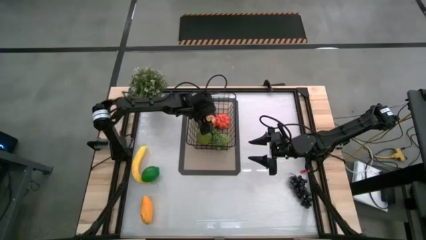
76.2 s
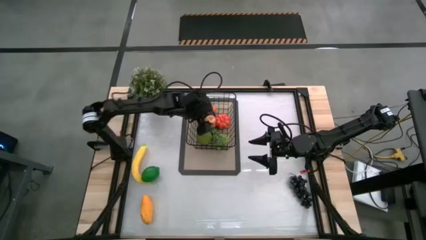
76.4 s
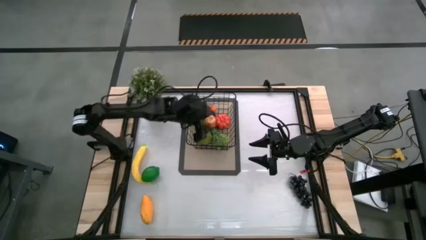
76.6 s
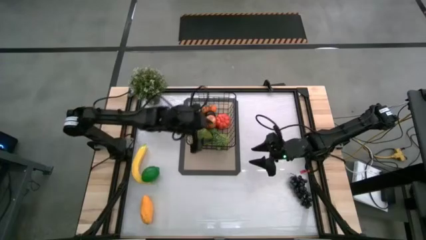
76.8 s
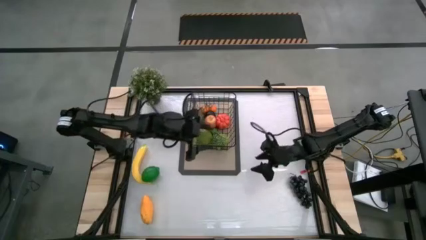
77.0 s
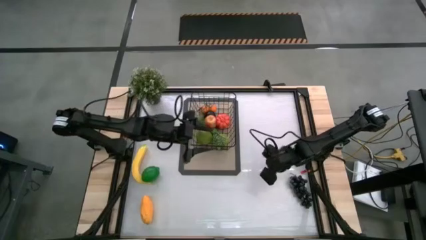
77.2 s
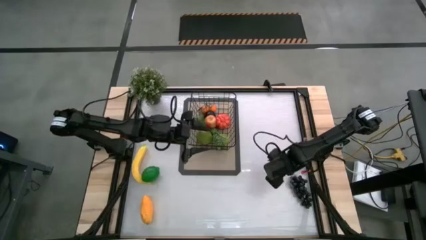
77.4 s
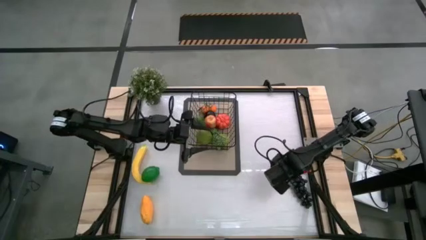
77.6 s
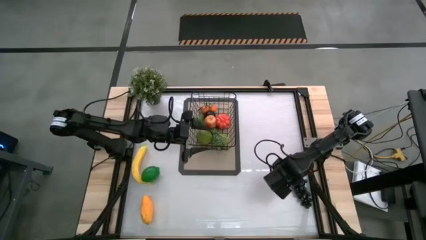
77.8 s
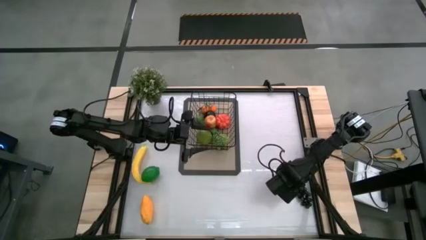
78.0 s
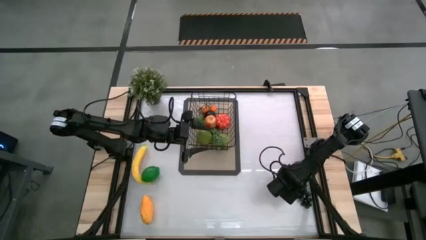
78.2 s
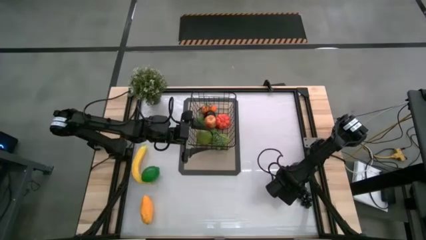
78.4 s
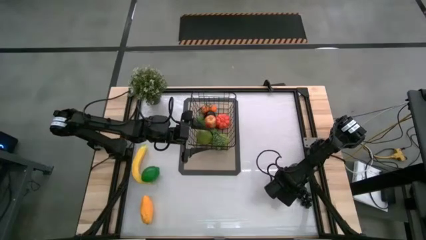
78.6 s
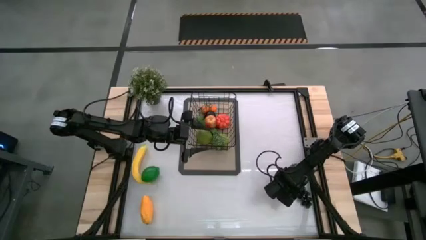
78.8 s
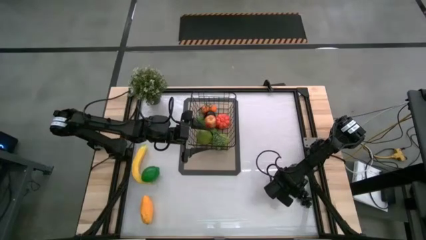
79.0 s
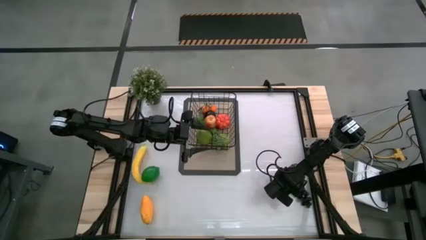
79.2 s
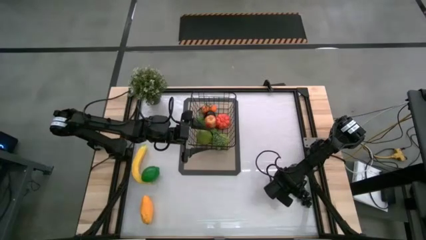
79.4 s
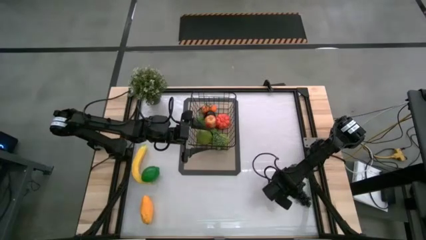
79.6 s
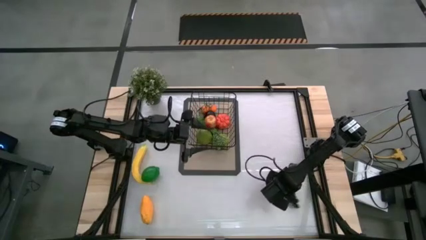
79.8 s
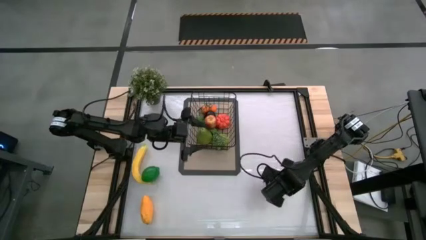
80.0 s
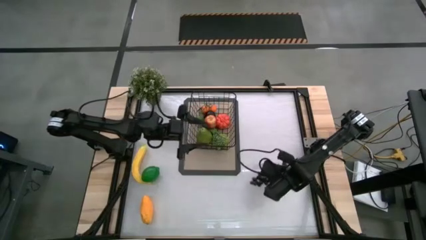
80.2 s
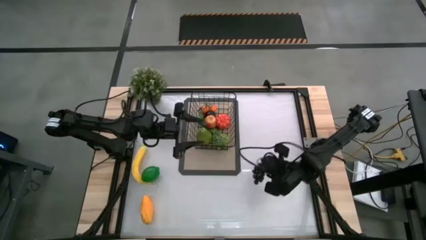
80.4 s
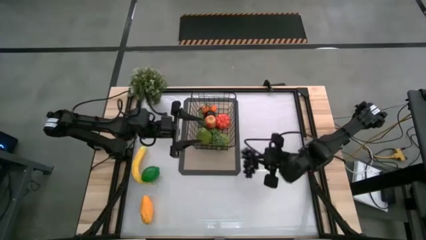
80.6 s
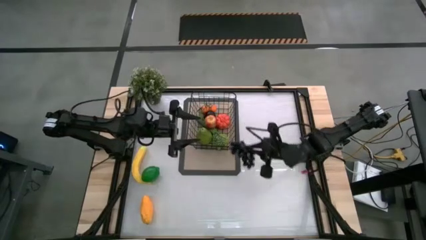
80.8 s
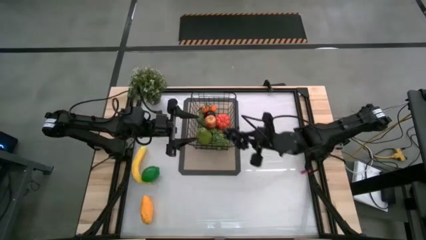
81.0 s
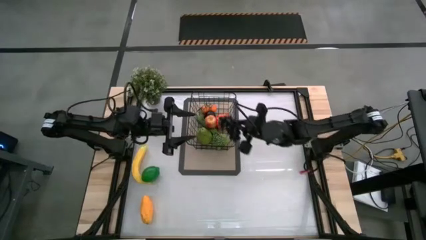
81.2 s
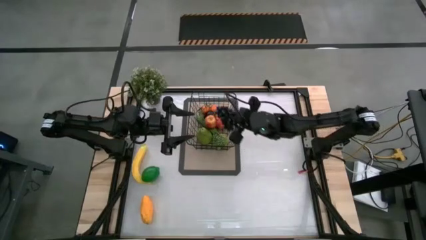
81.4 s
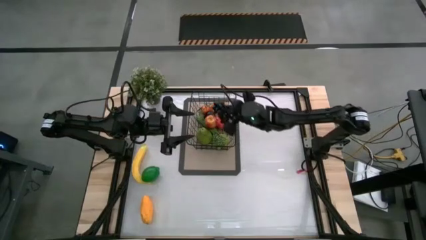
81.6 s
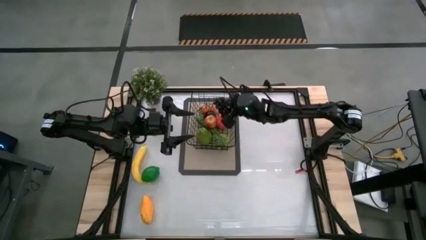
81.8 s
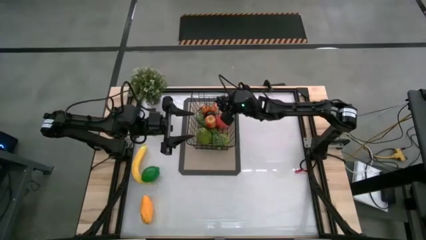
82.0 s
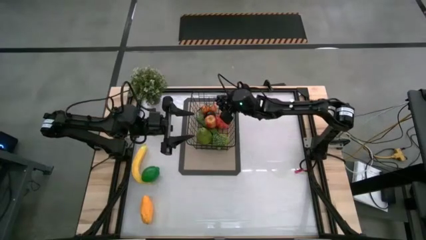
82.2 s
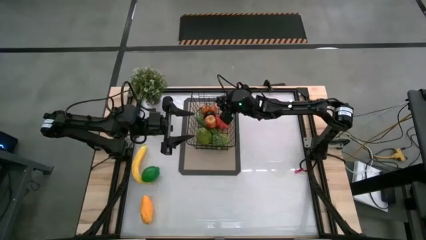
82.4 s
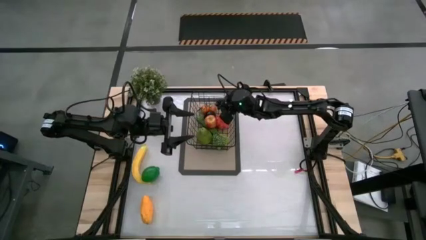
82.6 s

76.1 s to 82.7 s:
Task: Build produce basket
Put the black grapes into the black wire basket

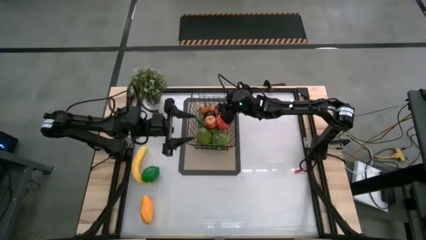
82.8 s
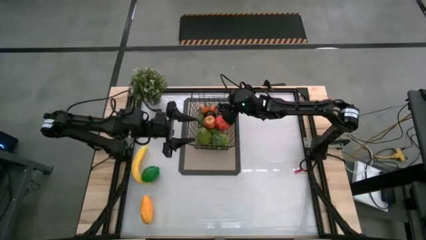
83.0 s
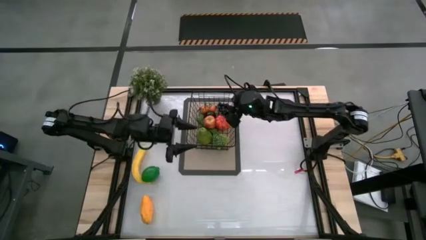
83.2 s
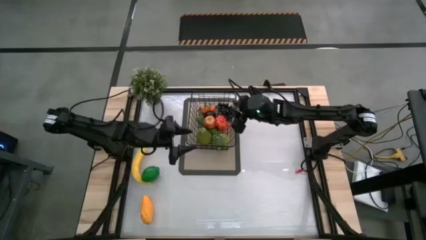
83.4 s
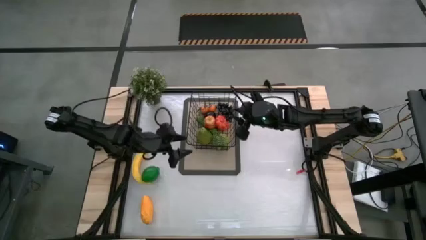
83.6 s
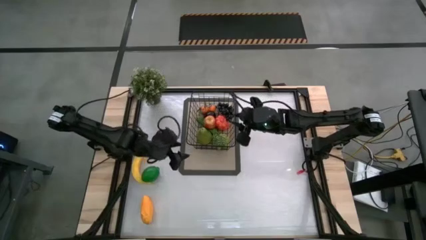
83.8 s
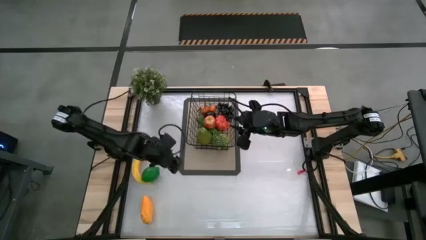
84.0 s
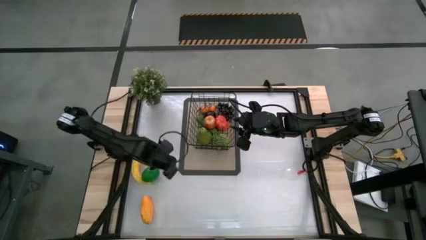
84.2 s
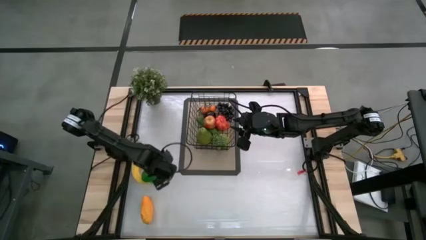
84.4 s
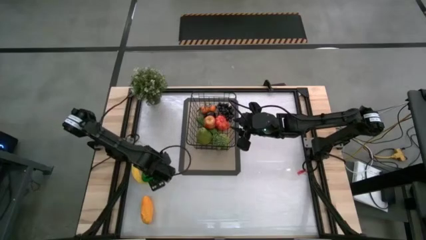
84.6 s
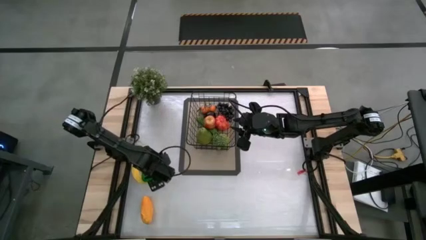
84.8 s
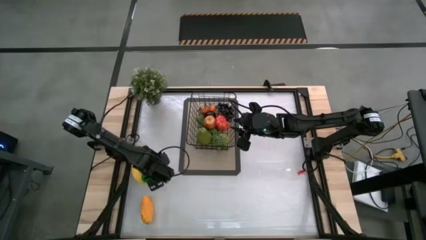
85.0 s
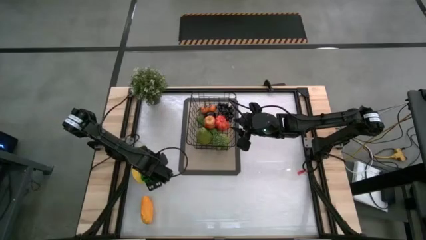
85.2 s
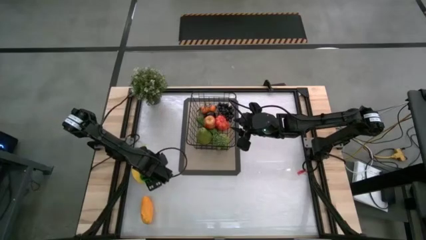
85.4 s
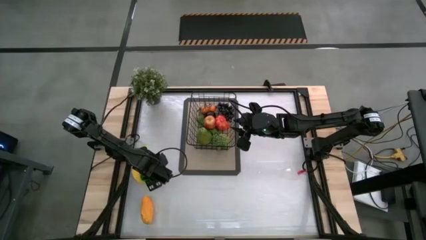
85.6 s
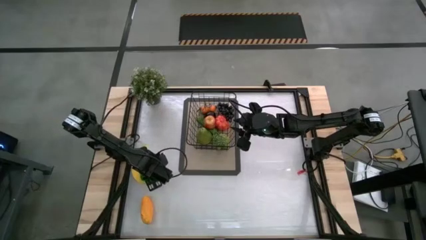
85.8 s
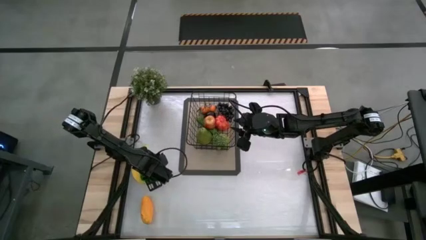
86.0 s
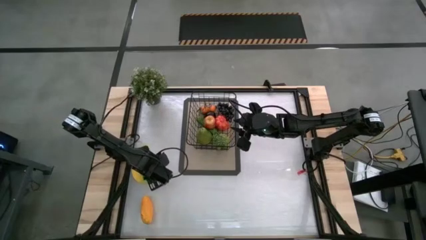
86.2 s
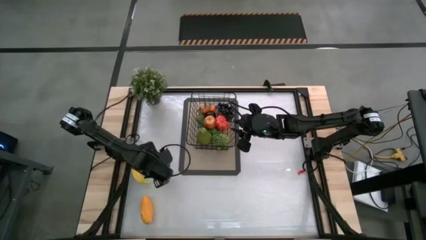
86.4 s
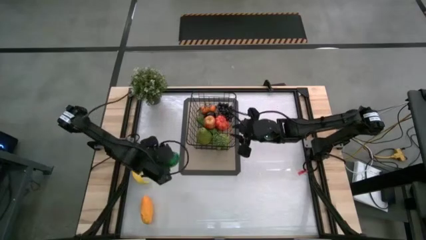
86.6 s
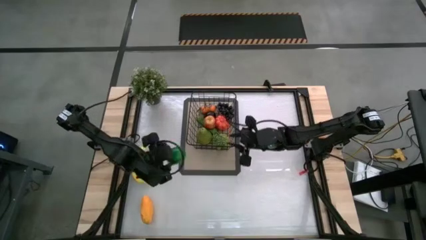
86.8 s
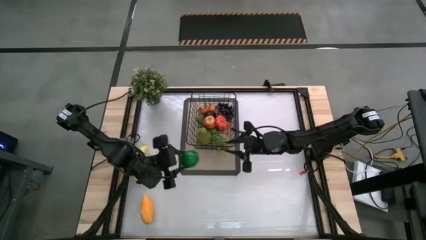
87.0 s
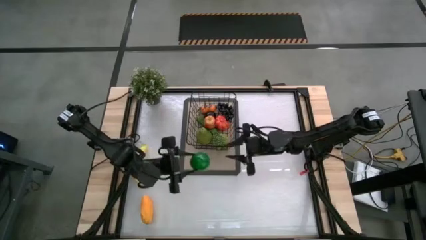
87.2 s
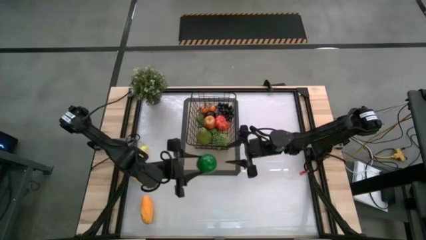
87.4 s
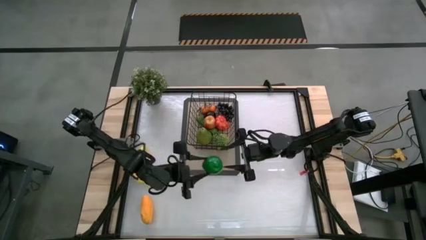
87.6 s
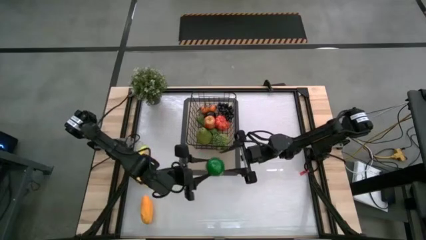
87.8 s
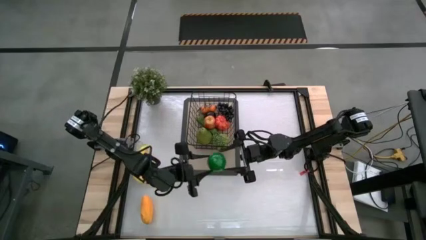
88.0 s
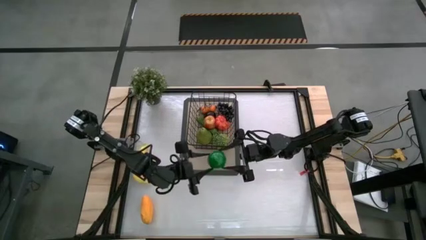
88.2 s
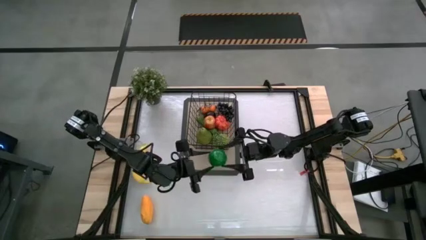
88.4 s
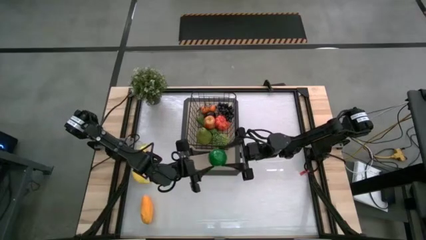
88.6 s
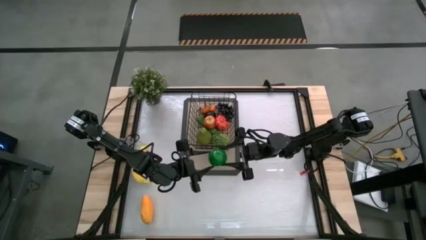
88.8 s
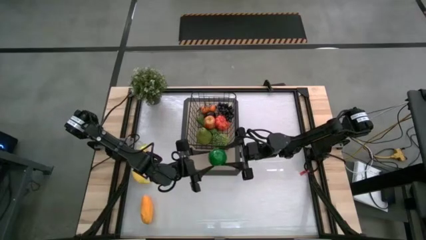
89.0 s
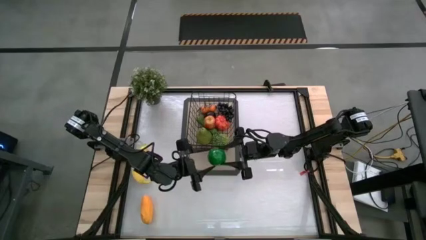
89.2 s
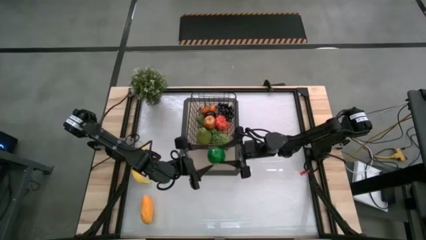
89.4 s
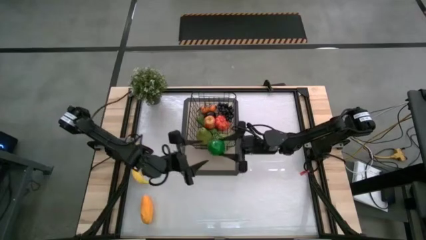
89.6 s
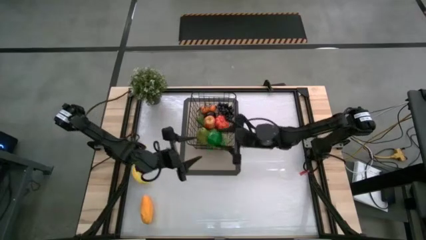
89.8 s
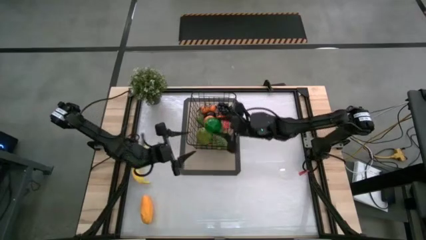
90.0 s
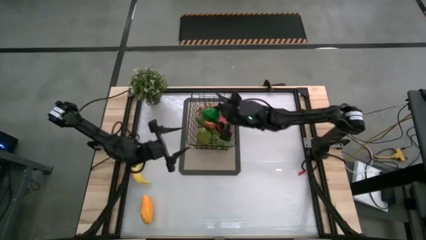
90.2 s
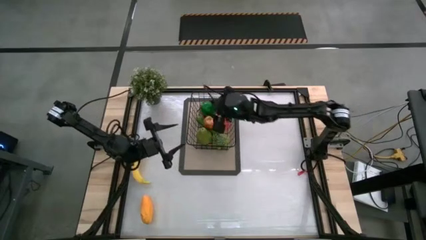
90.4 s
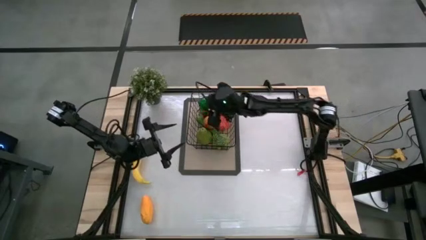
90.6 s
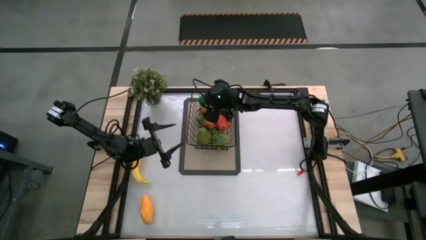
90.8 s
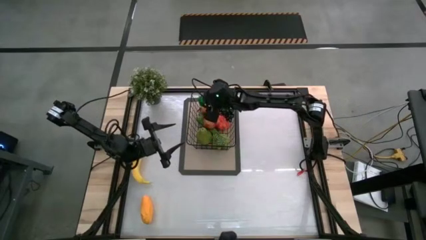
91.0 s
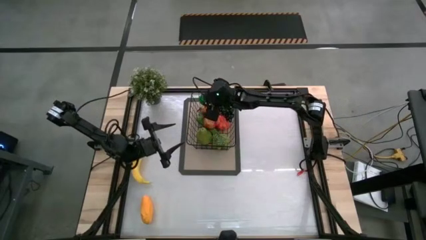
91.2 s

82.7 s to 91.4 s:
Put the lime into the black wire basket
